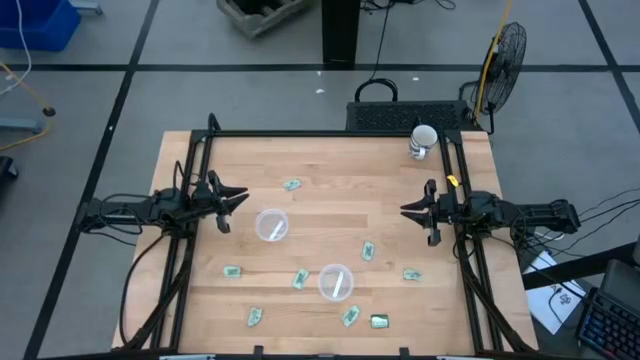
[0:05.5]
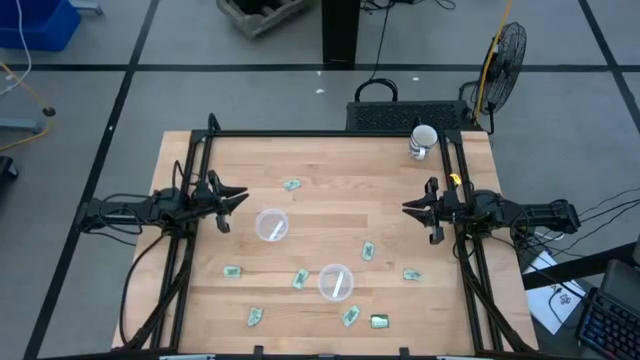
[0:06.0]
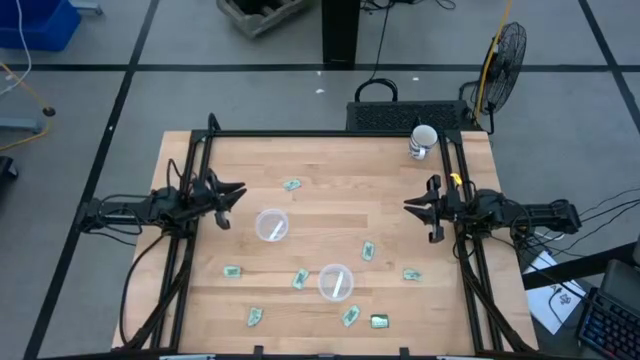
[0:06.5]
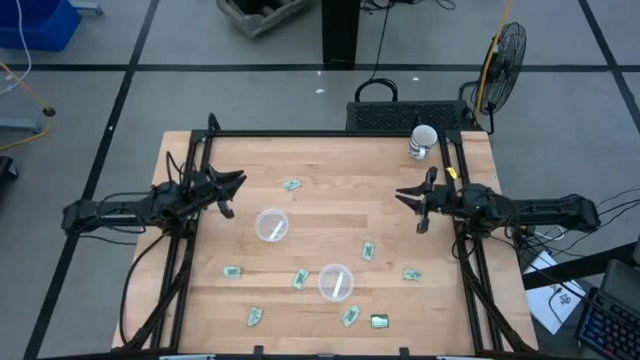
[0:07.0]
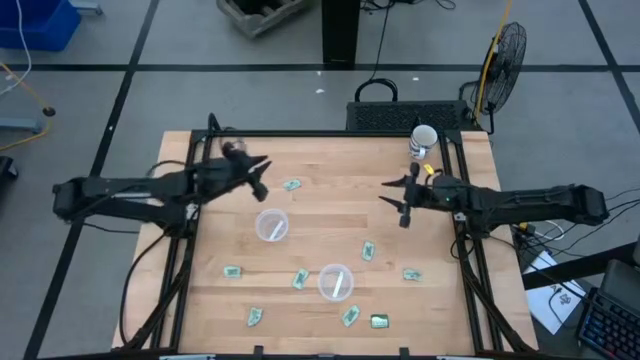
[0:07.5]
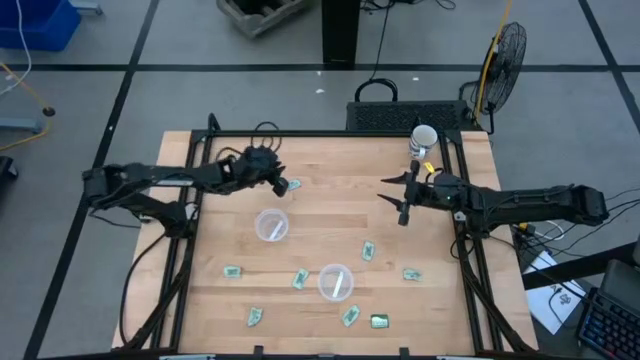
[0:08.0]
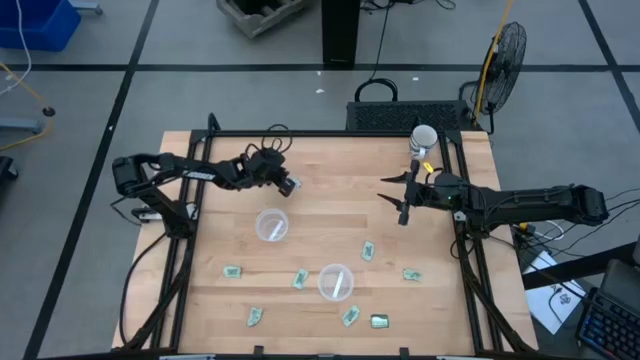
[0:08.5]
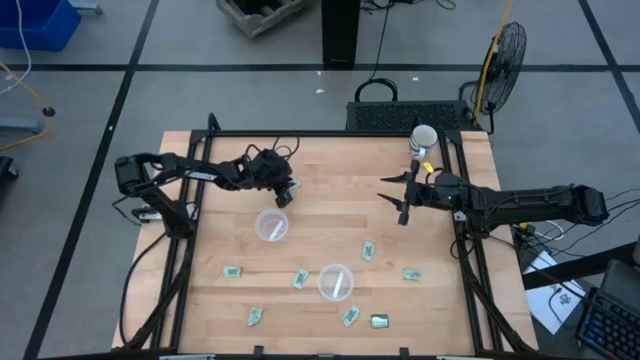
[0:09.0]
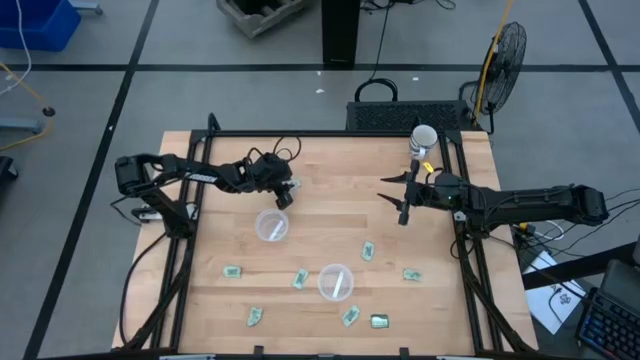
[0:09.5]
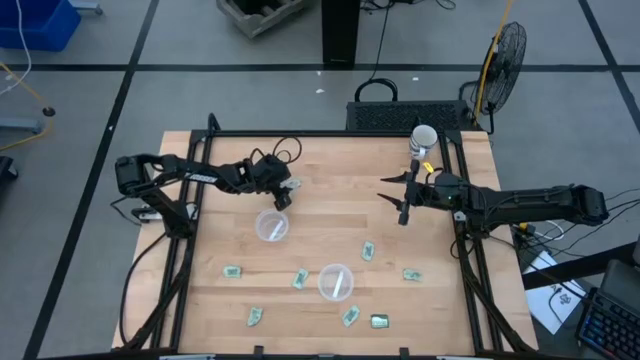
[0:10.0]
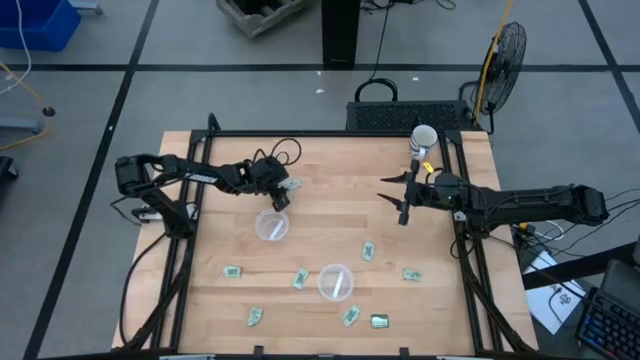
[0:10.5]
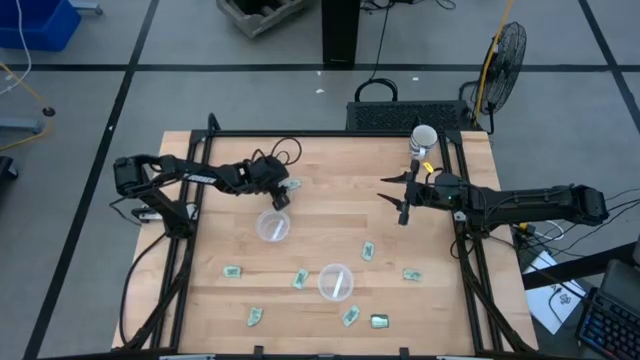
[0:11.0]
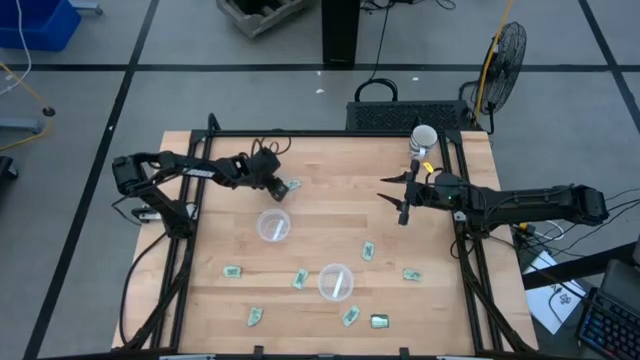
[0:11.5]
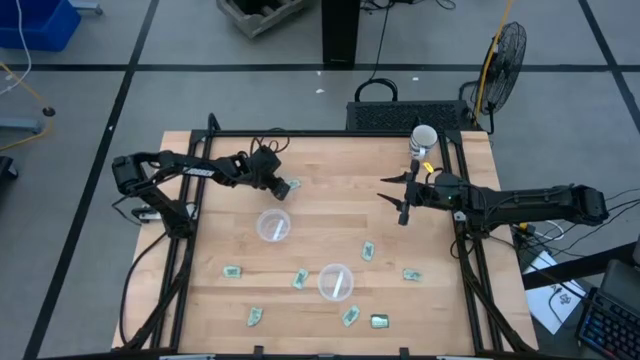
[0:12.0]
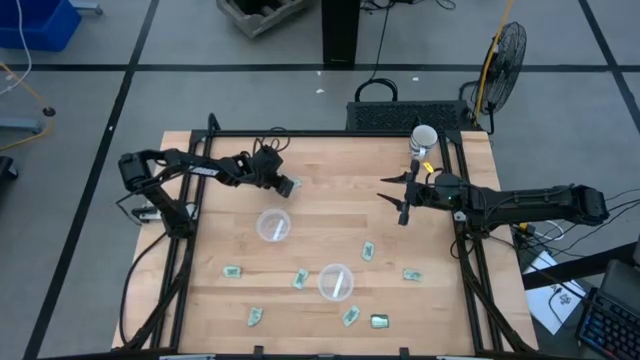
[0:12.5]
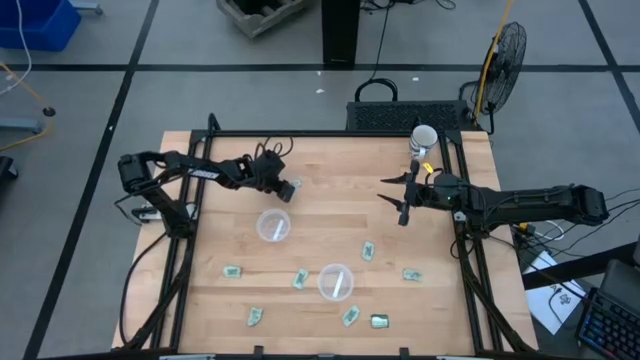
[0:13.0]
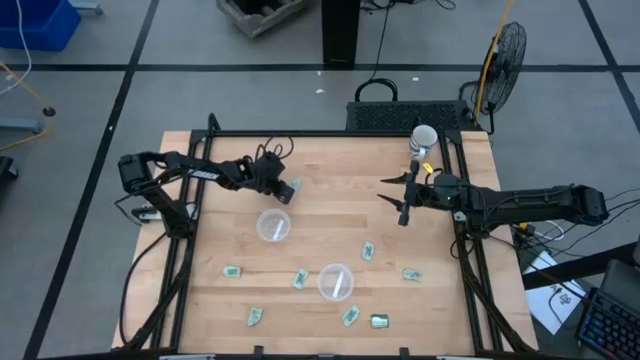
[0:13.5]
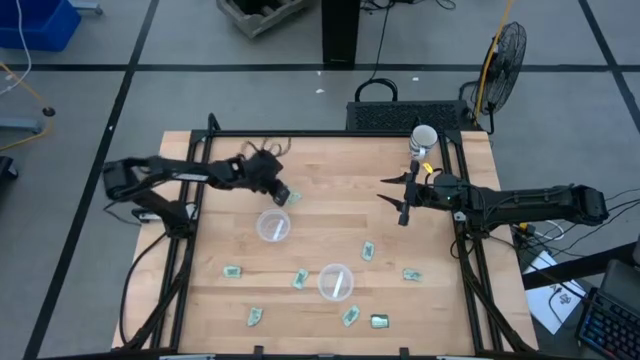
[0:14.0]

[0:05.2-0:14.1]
Task: Pick and place items into bin
Put the white stevia packet into the top transparent bin

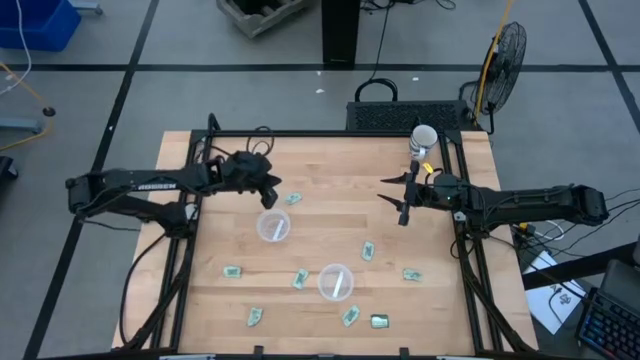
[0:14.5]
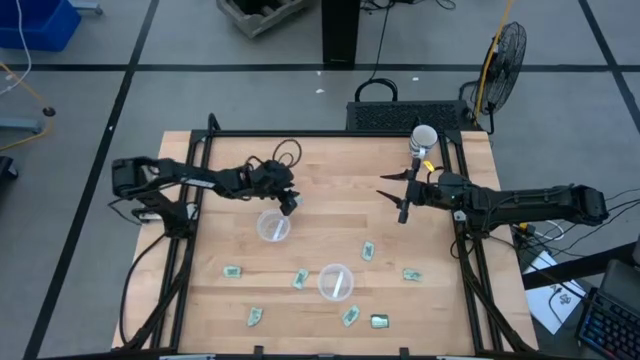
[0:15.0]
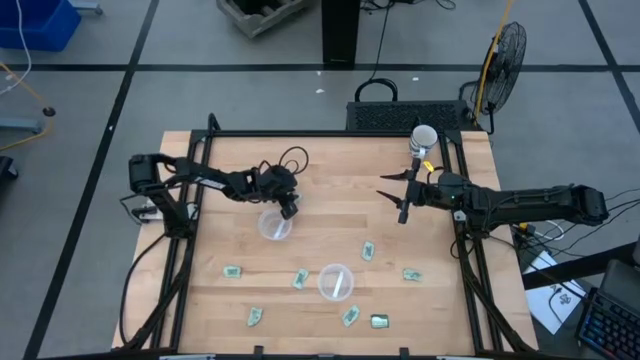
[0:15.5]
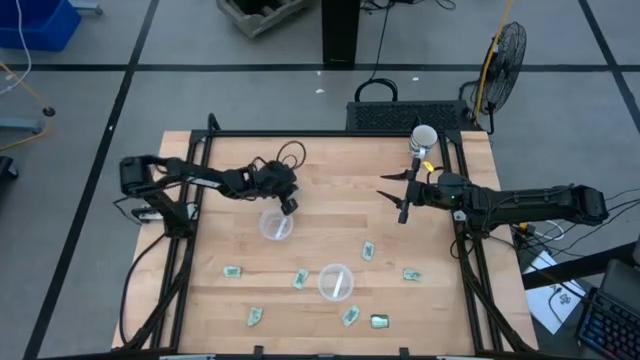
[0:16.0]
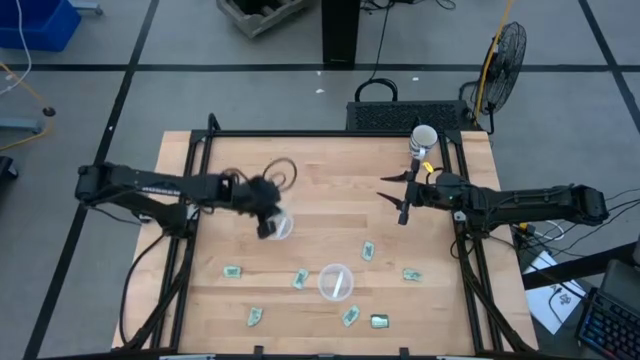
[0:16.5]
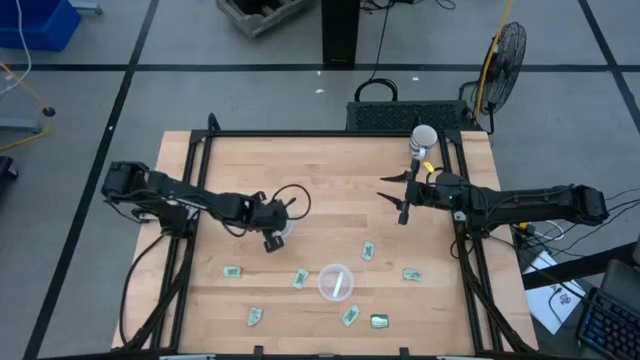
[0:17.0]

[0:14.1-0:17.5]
Put the white stevia packet into the top transparent bin

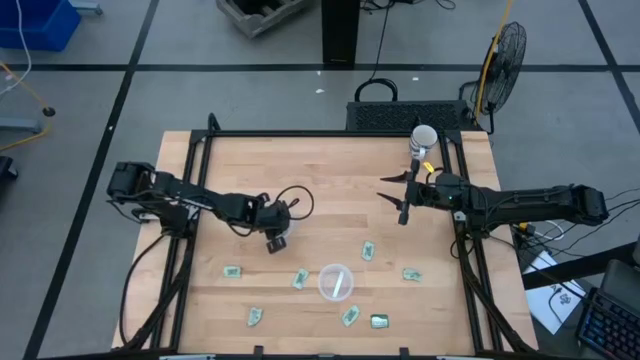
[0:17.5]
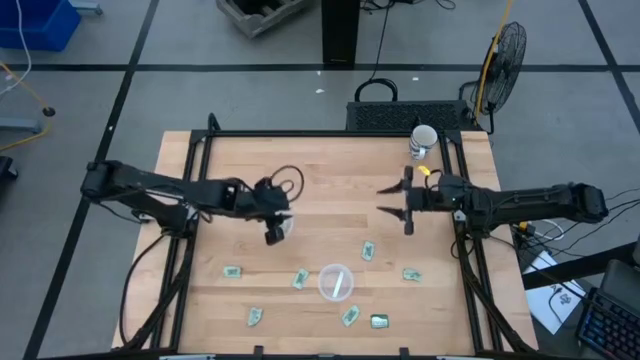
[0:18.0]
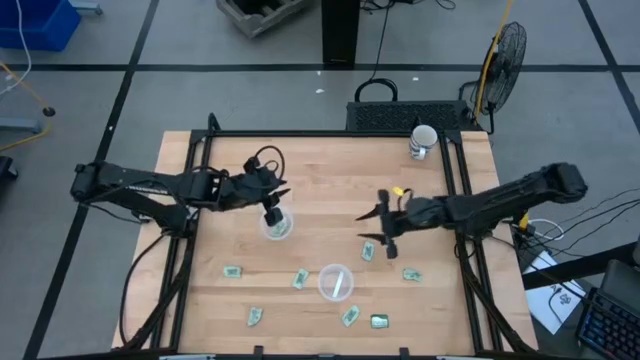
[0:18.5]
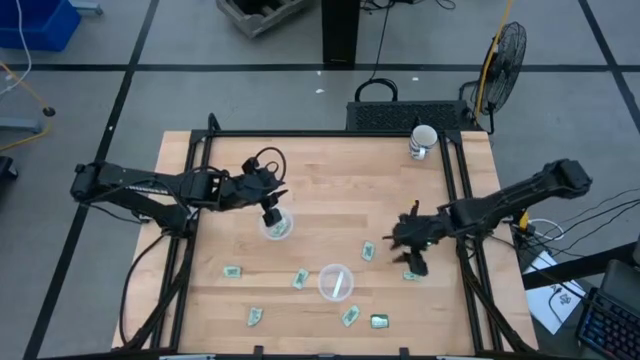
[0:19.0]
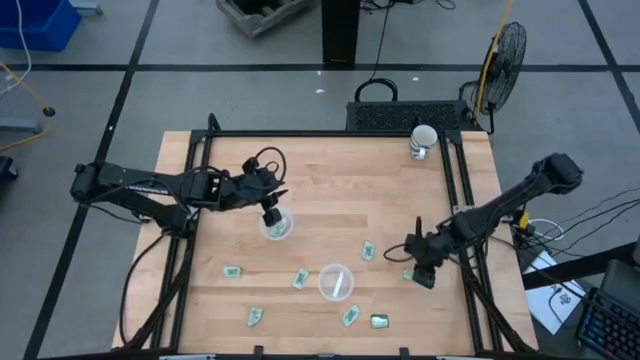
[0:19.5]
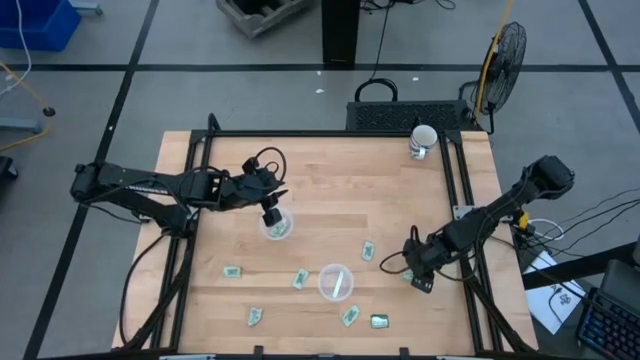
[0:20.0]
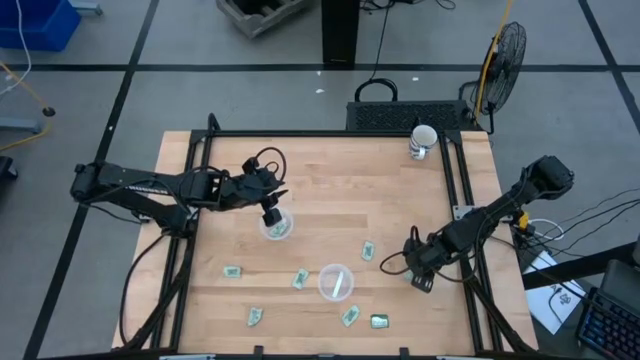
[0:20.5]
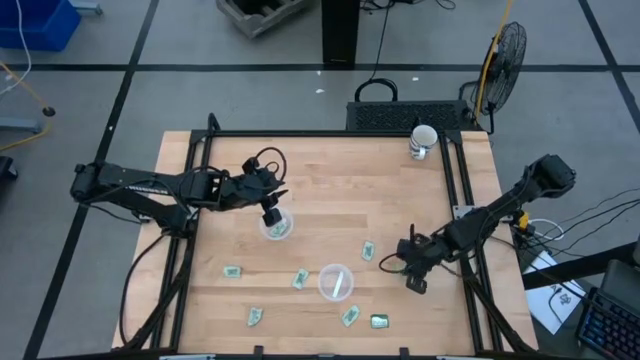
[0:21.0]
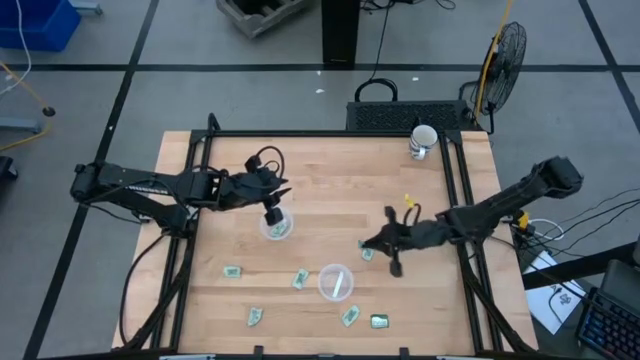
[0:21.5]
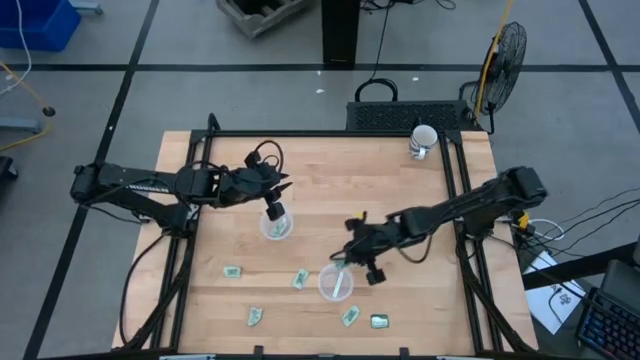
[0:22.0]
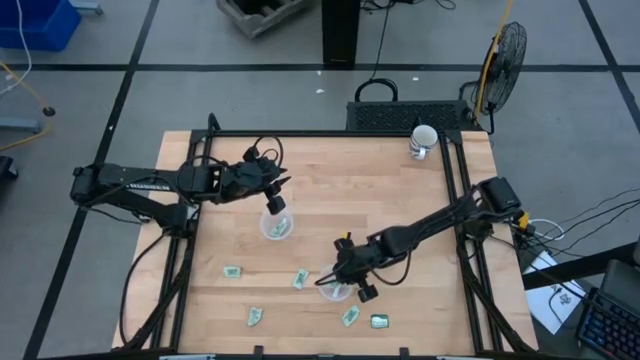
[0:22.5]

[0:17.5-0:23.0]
Put the white stevia packet into the bottom transparent bin

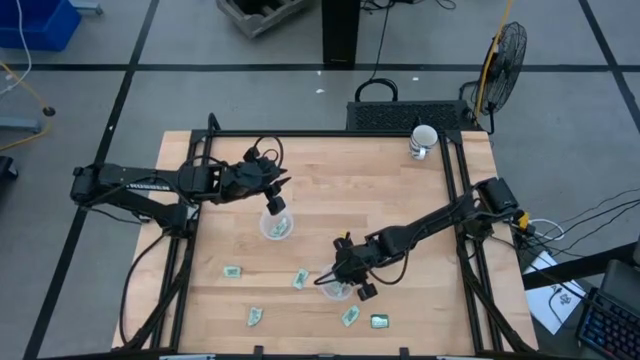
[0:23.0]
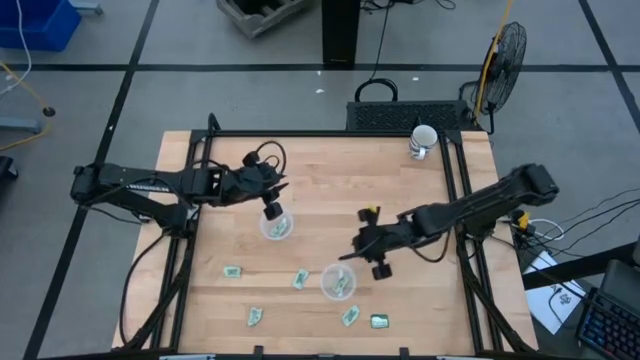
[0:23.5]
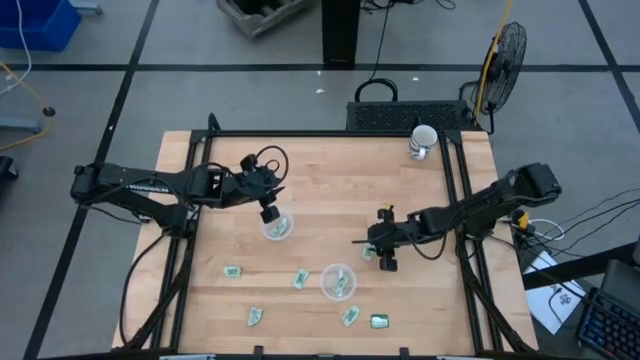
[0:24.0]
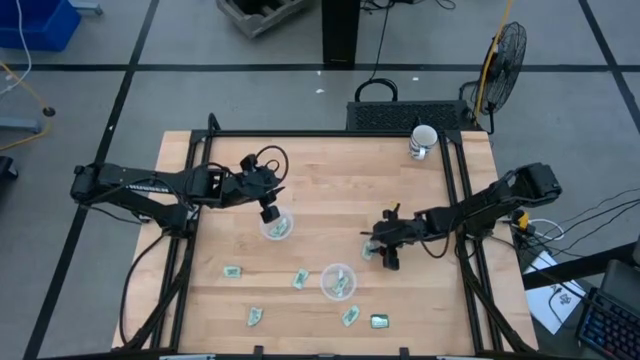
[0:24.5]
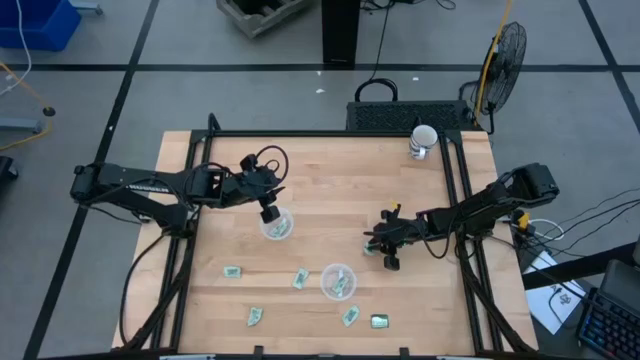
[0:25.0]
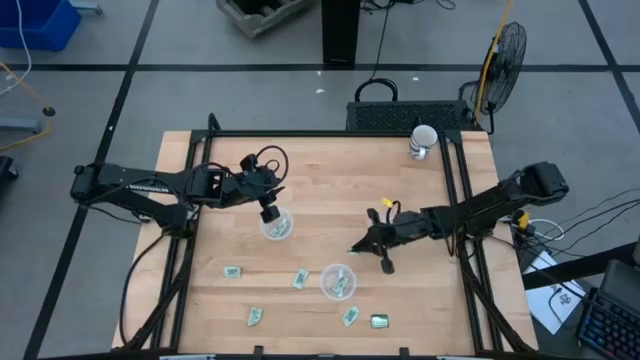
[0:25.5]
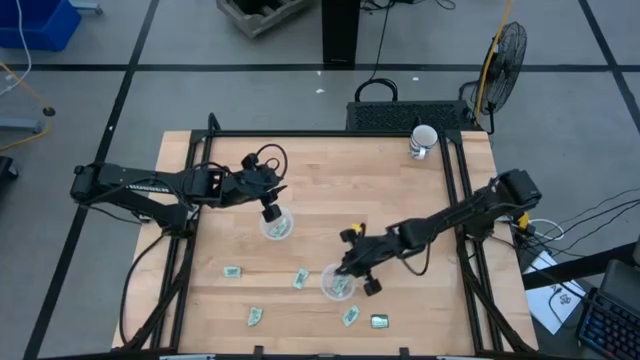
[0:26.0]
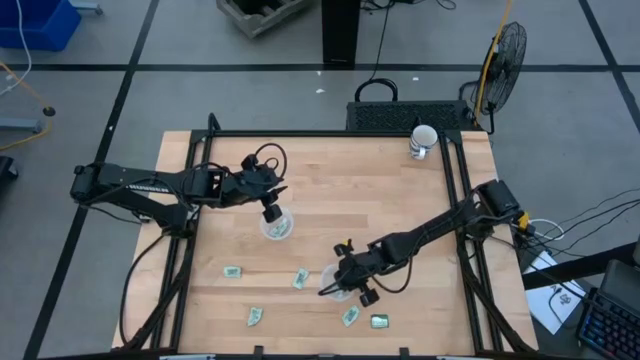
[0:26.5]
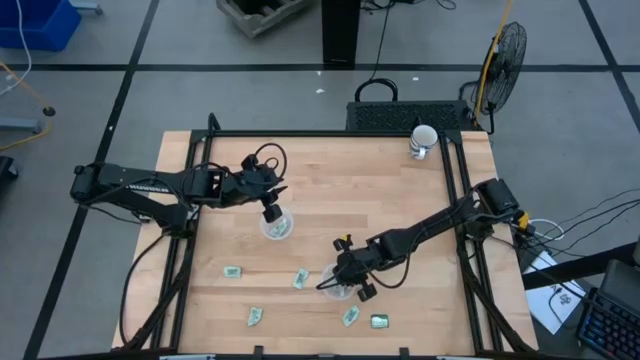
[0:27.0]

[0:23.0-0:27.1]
Put the white stevia packet into the bottom transparent bin
